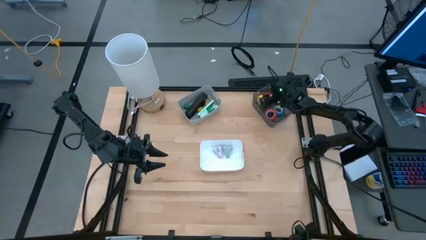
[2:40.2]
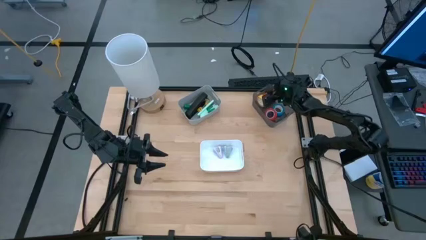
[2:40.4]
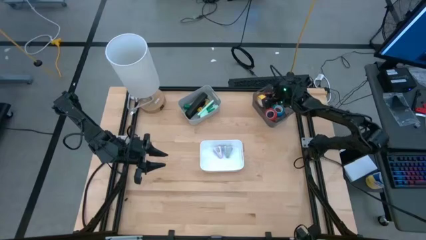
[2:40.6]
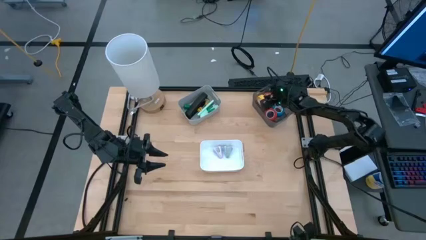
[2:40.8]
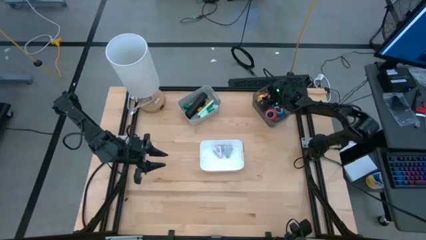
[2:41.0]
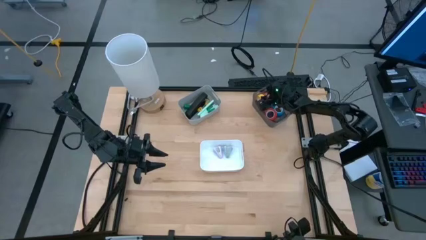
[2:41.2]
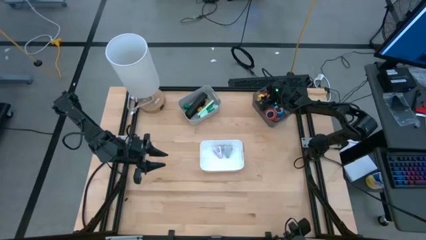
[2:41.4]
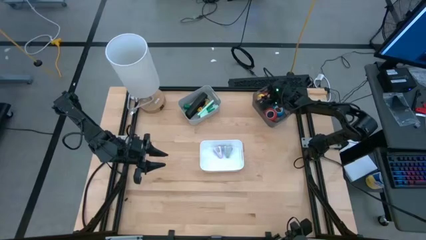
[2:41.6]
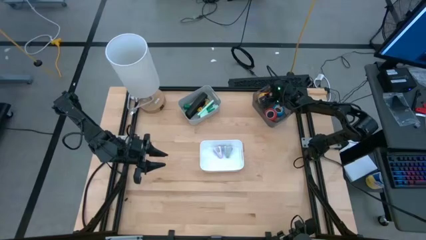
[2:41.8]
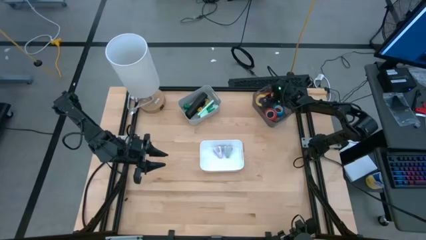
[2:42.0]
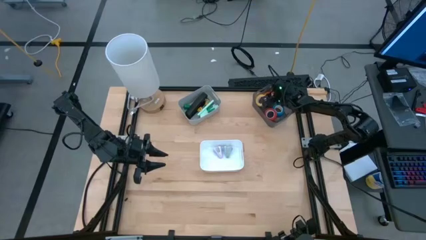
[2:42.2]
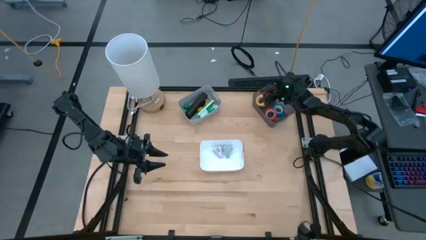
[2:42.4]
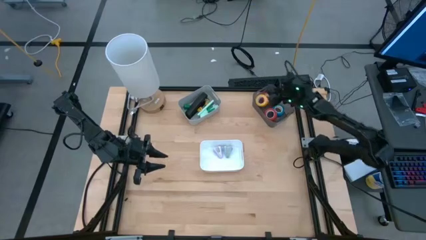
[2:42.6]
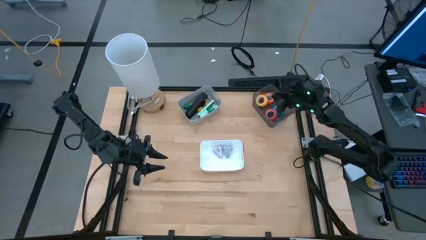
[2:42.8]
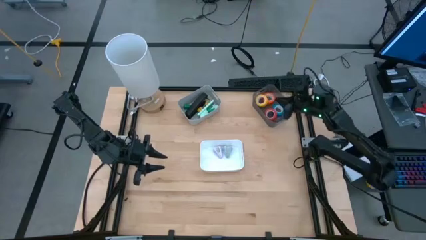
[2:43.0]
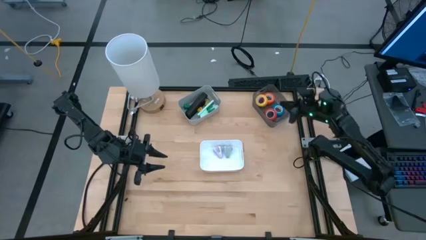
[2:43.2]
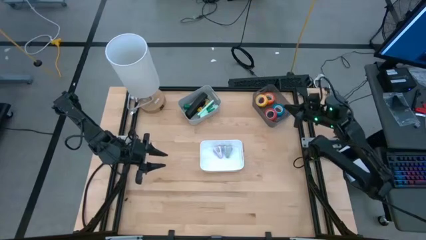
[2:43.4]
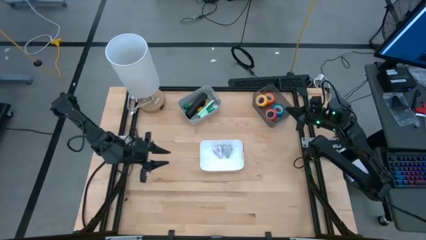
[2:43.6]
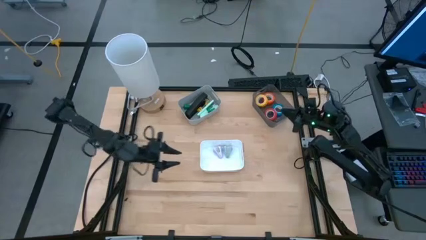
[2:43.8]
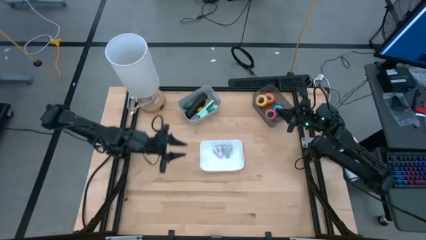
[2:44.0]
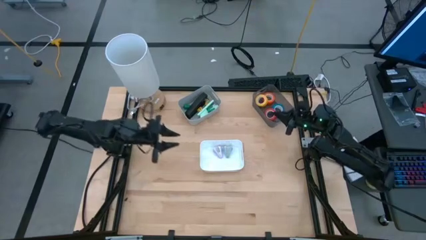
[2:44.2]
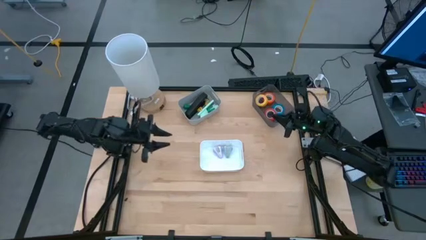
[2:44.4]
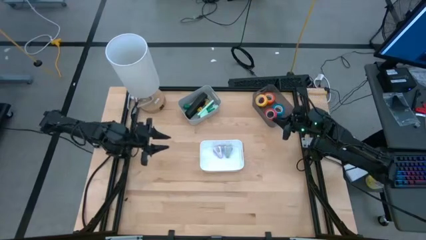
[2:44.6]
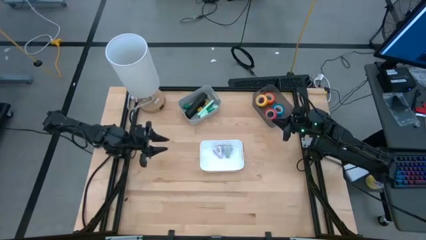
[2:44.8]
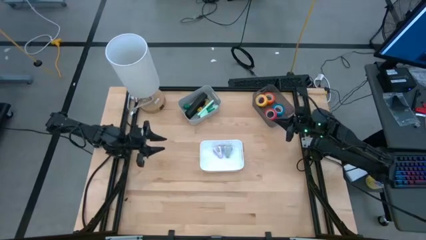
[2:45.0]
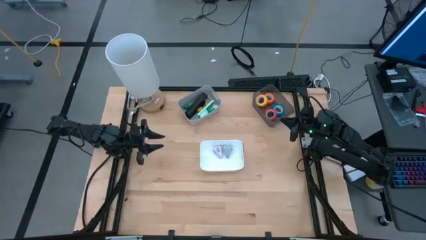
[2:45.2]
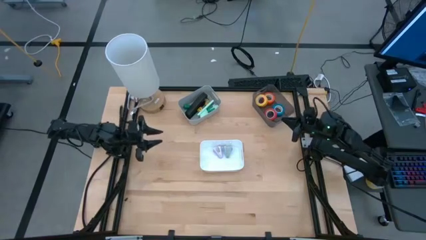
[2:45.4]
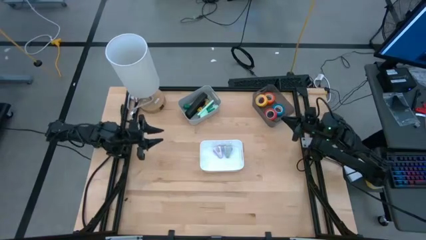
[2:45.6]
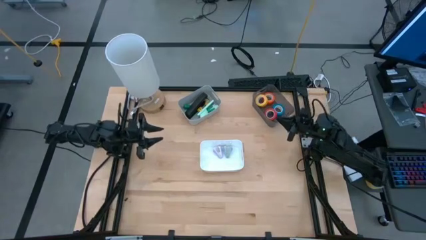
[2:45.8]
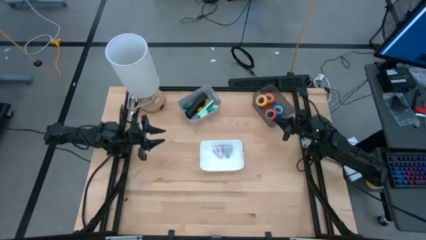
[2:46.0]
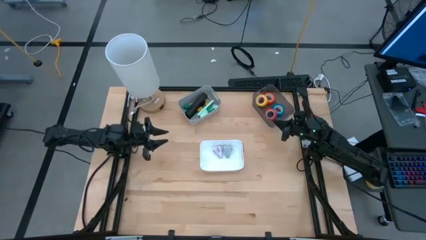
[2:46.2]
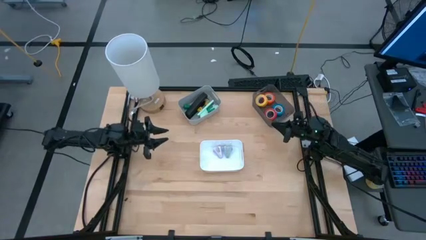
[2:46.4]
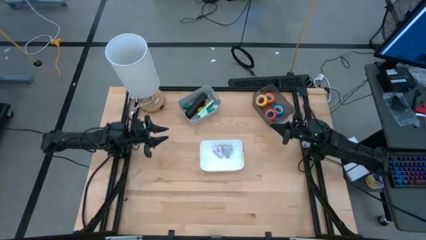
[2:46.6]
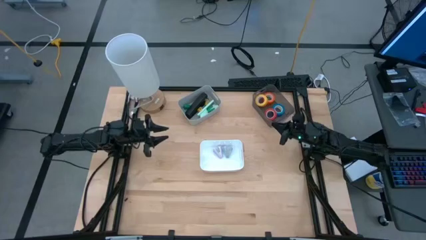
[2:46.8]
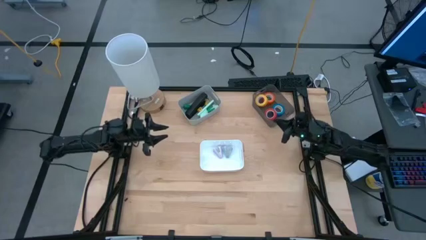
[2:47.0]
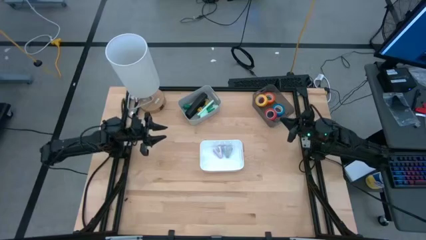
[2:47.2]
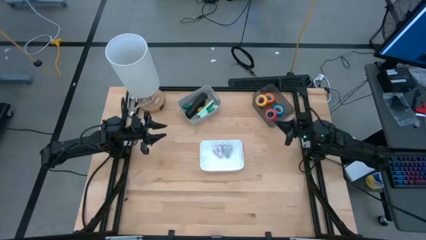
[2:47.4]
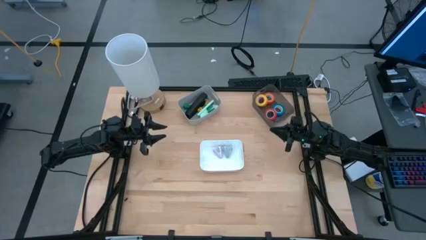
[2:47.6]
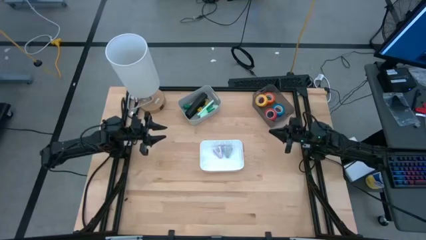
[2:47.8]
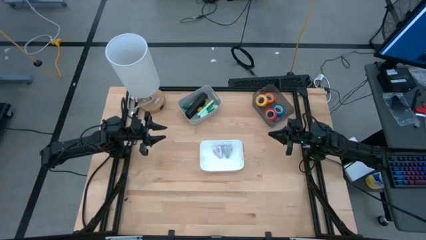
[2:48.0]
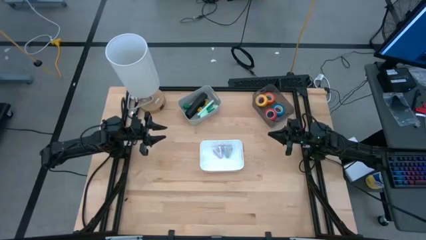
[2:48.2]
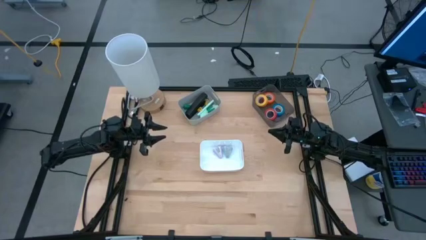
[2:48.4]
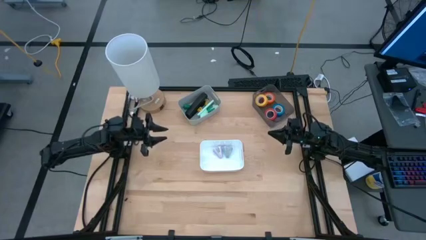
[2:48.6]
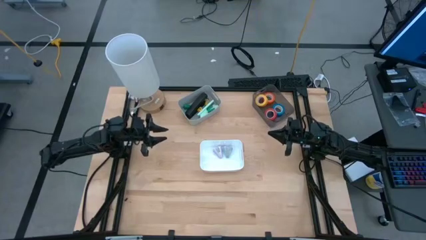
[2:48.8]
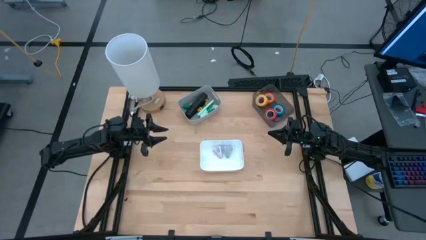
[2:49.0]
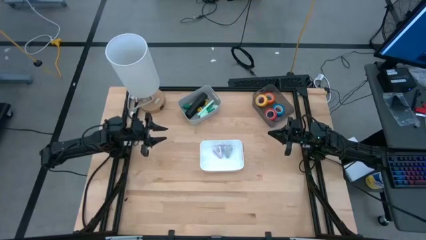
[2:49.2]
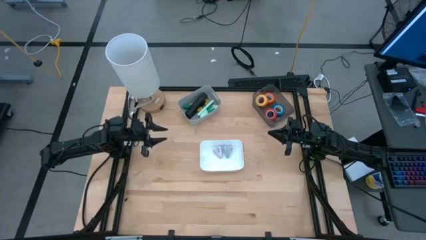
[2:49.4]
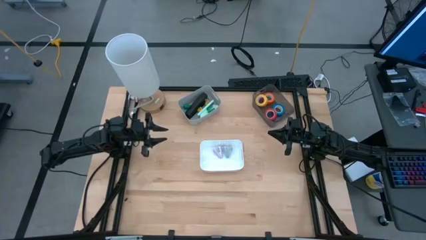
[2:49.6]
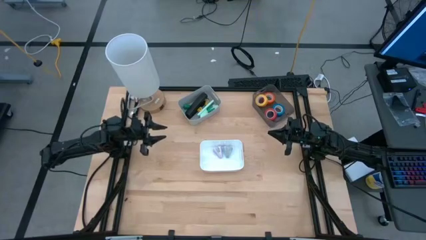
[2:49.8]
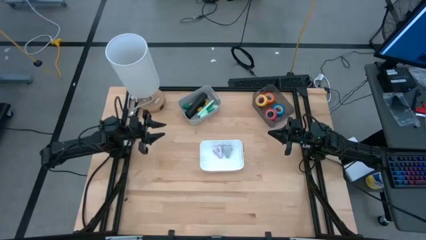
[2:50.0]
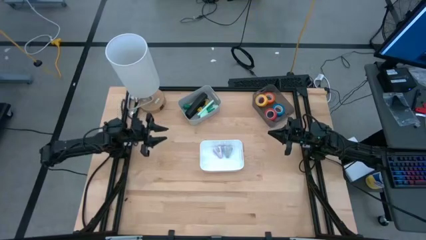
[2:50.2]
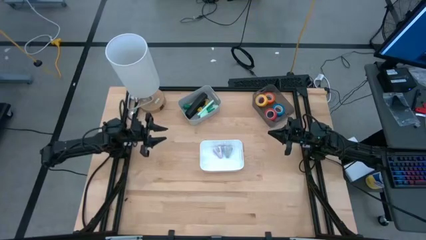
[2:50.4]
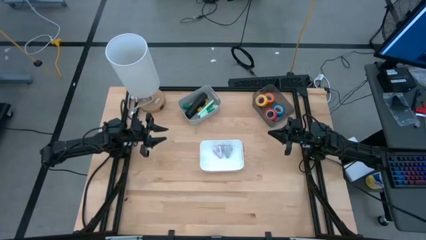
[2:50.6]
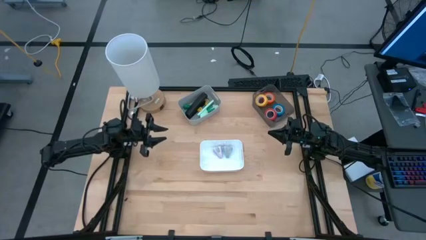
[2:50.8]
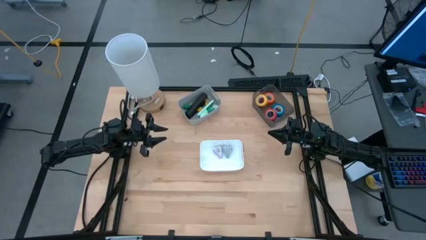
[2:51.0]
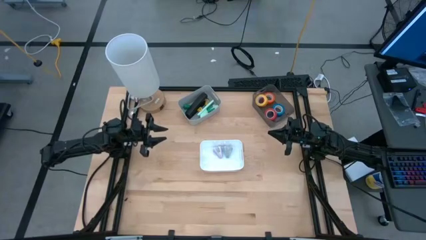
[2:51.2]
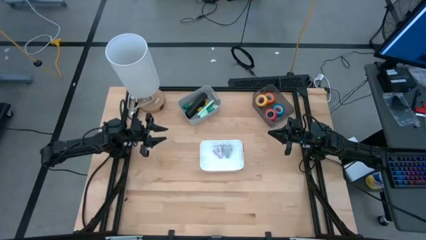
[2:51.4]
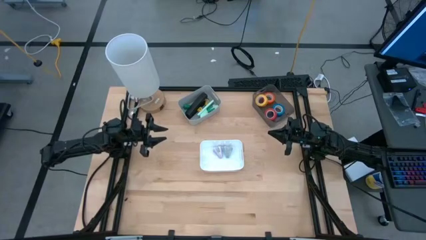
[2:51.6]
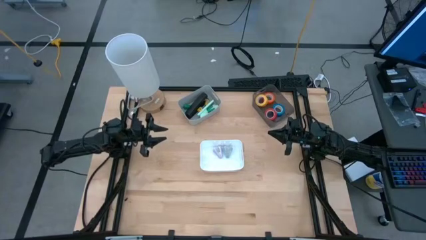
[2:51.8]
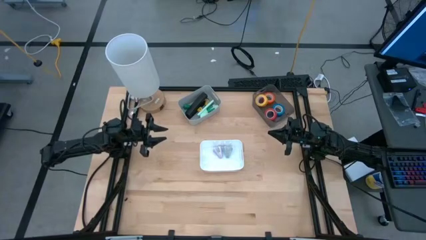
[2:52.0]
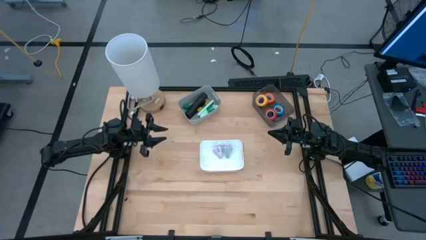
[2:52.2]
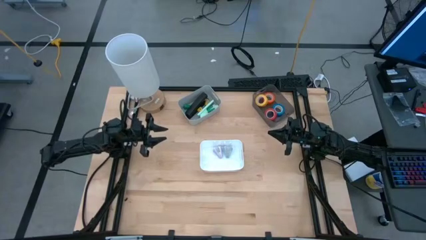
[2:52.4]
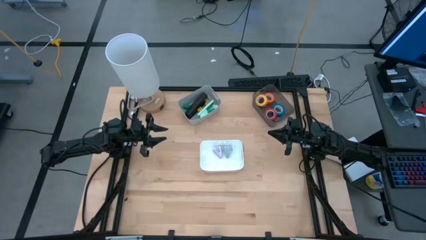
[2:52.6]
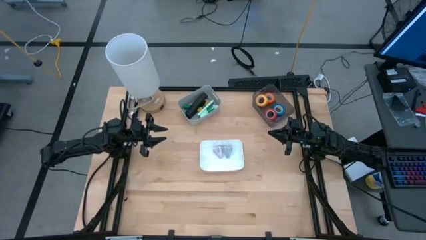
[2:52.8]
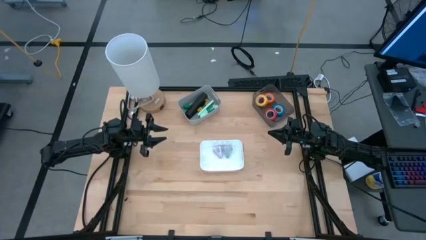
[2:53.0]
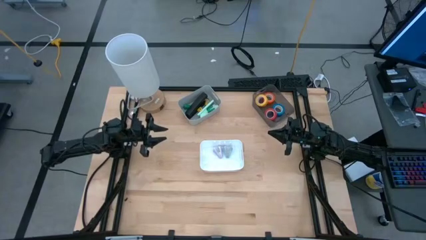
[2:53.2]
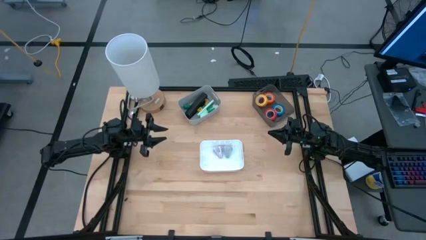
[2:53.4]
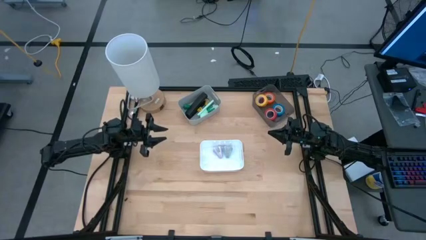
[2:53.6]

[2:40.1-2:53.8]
Task: Pick and place Stapler, Stapler remover, tape
Return to Home Position

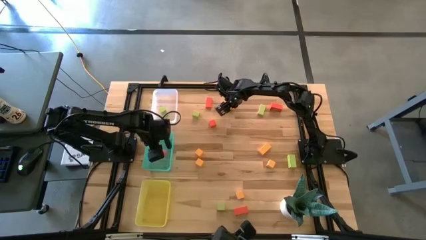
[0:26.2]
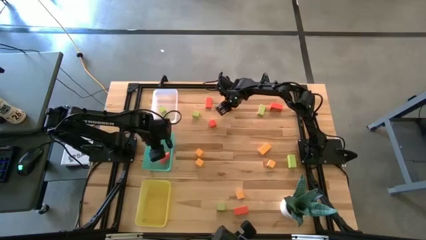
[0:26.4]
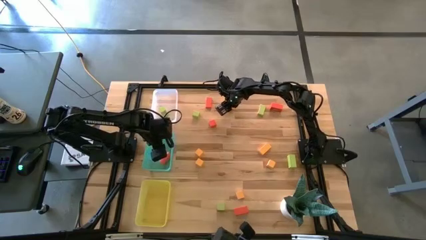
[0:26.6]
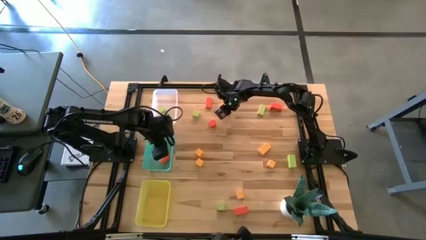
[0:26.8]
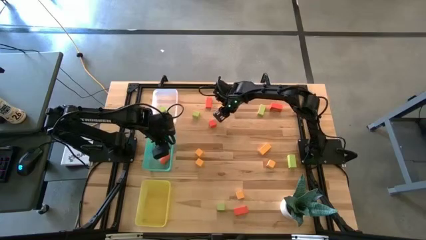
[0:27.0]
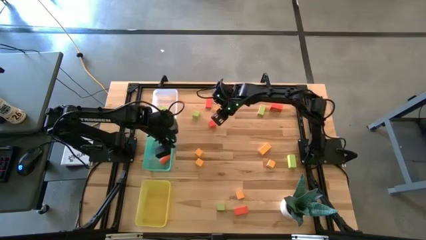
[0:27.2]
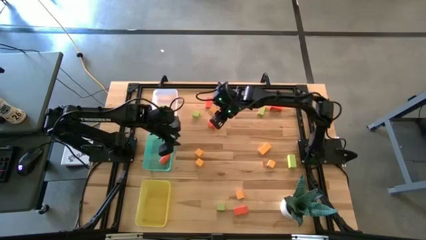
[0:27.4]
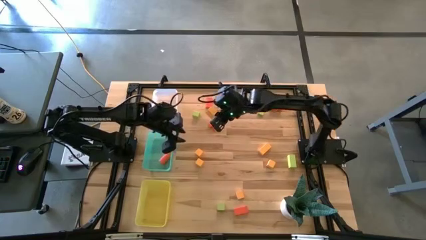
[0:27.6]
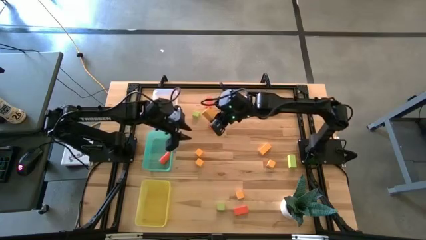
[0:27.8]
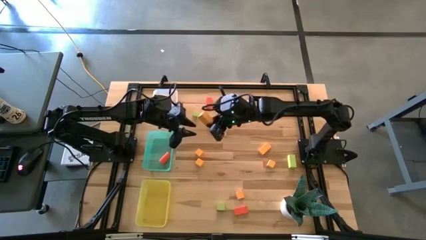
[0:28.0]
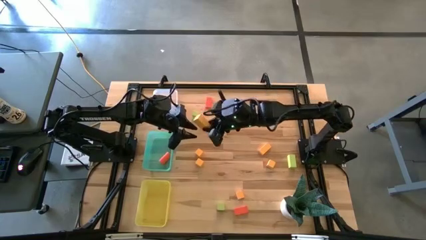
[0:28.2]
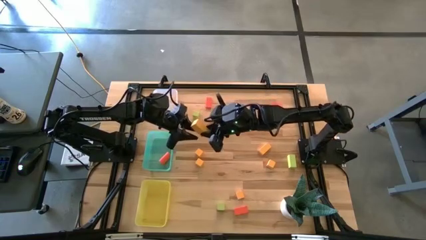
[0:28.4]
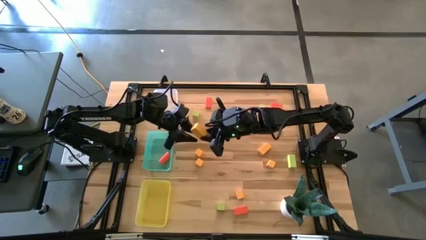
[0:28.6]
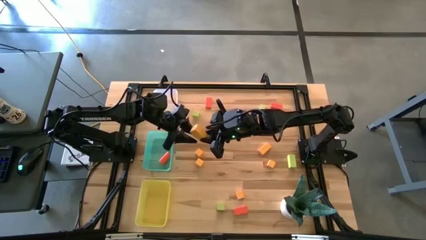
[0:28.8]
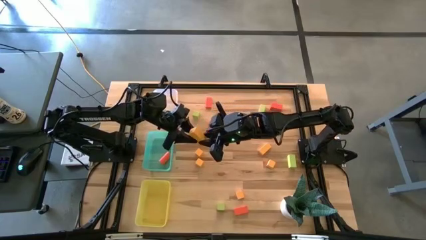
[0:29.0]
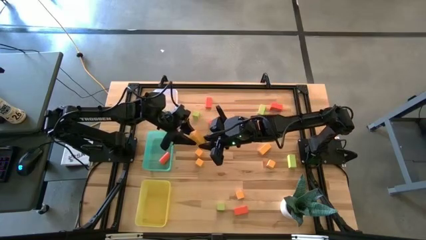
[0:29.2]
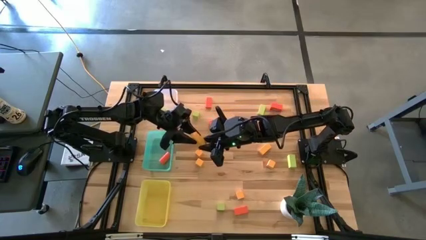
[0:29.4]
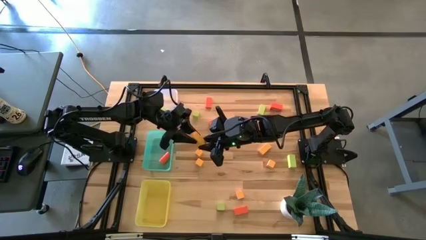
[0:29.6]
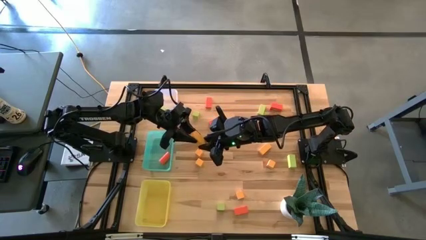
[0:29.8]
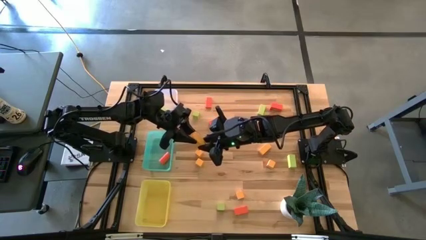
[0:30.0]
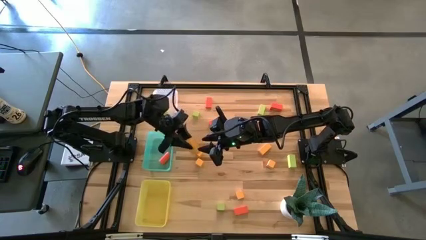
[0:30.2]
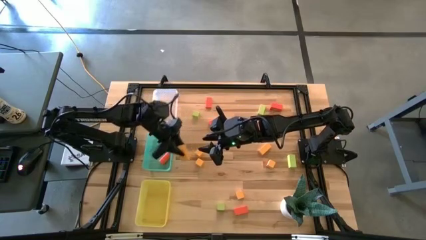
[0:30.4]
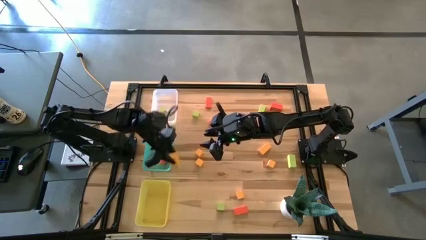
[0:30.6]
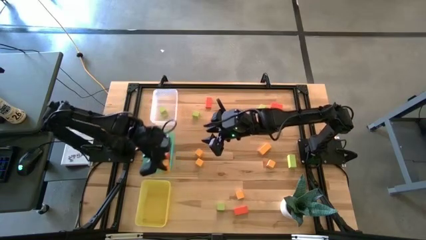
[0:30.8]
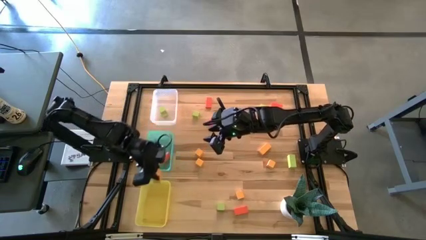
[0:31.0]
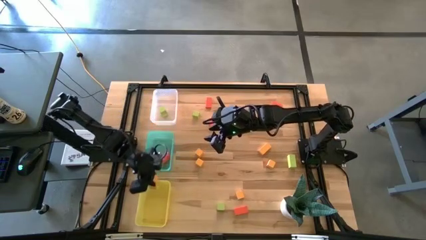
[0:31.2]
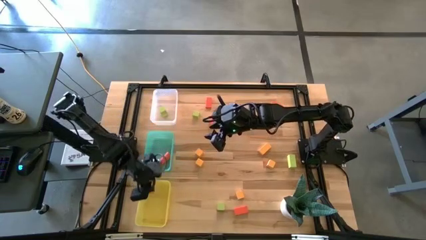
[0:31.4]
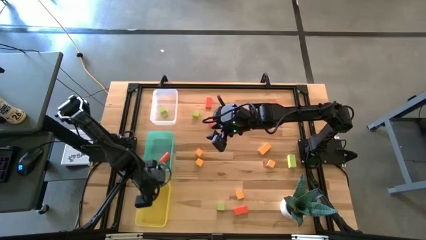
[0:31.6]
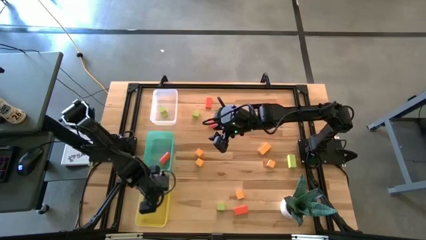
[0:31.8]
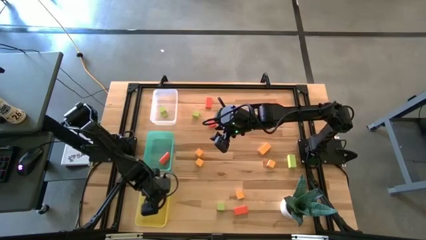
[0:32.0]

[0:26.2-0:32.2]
Task: Sort & place blocks by color
Put the yellow rectangular block into the yellow bin
